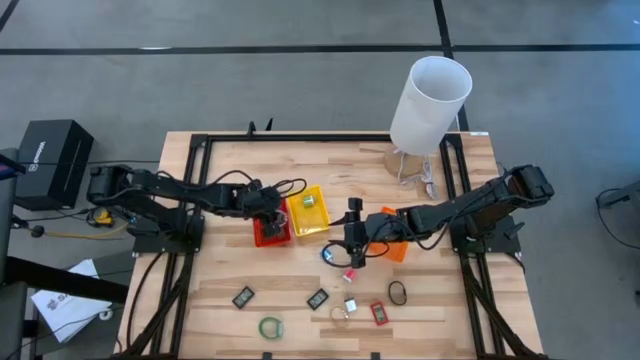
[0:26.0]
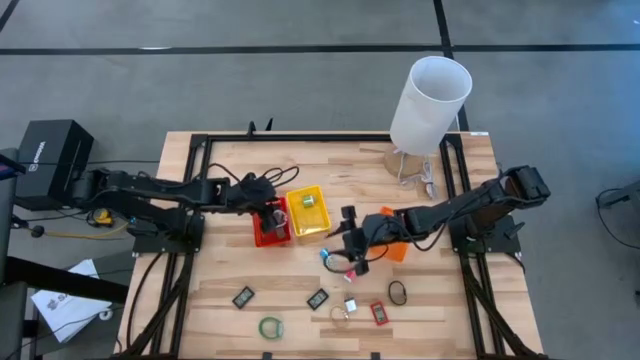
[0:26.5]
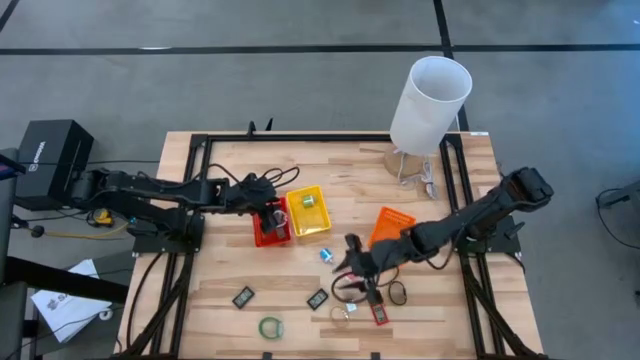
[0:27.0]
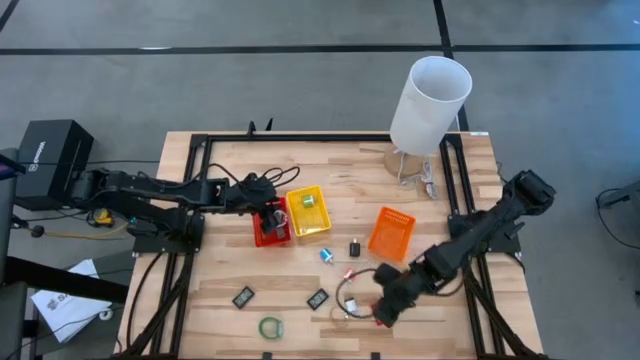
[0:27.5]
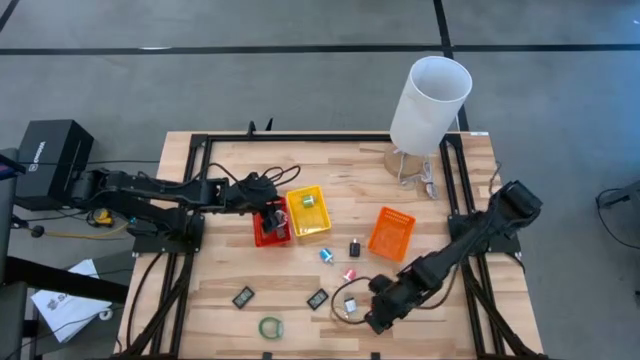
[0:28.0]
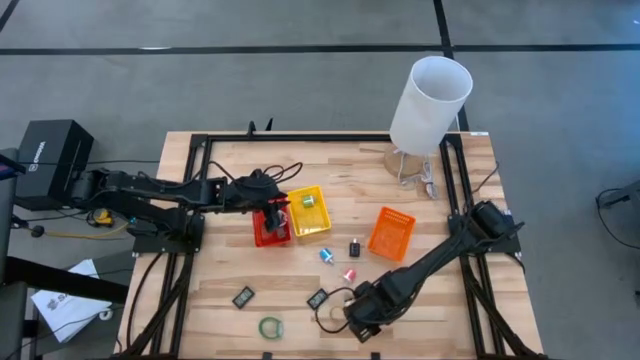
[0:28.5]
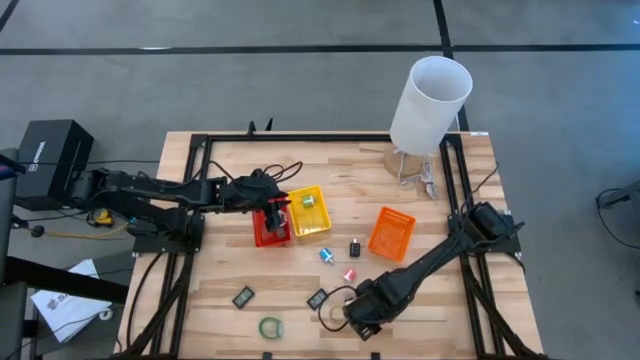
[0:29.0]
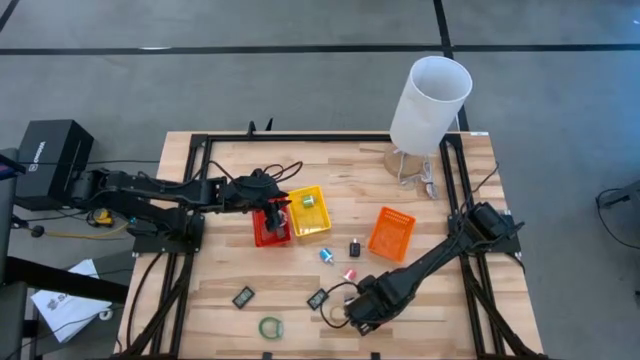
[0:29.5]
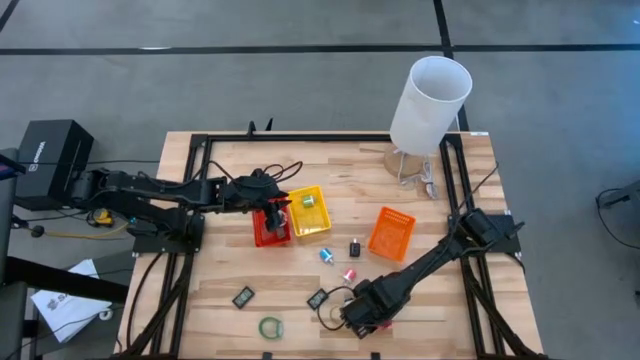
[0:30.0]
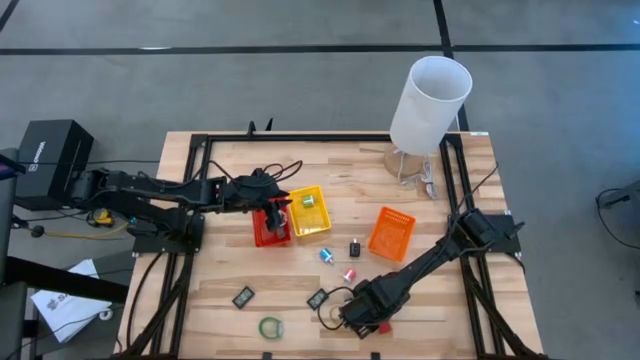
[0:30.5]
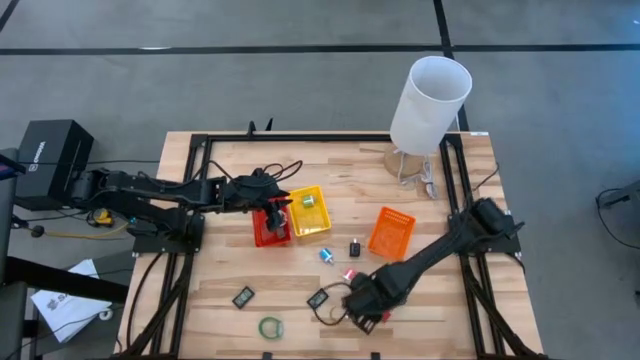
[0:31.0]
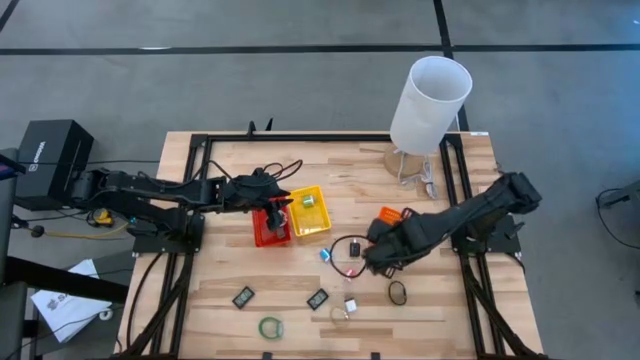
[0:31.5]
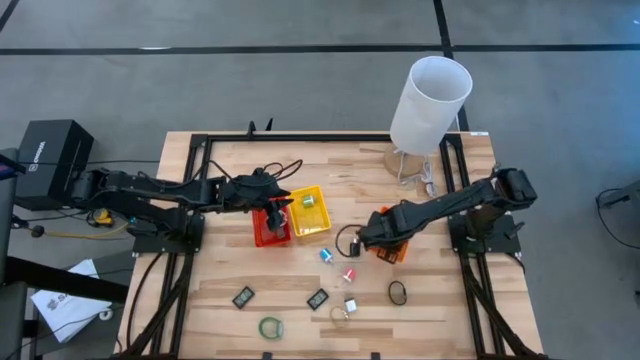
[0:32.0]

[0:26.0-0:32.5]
Task: Pick & Place Office items
Put the red digital clock into the orange bin

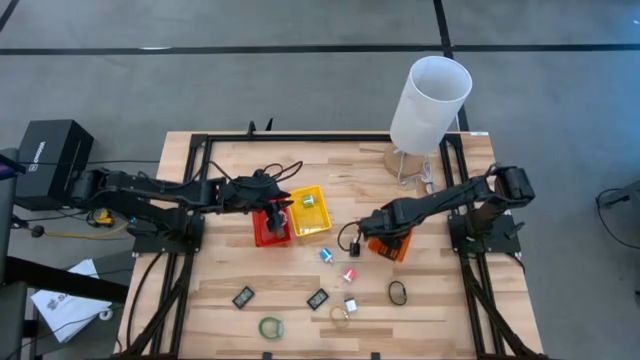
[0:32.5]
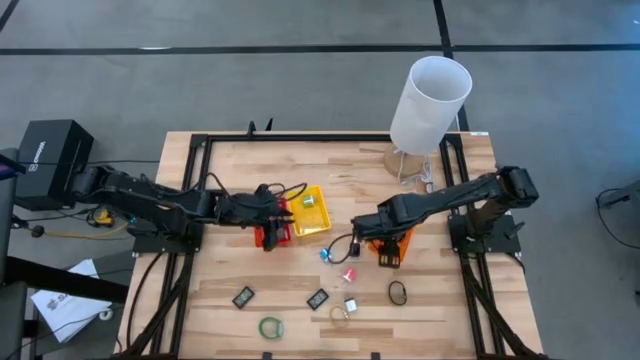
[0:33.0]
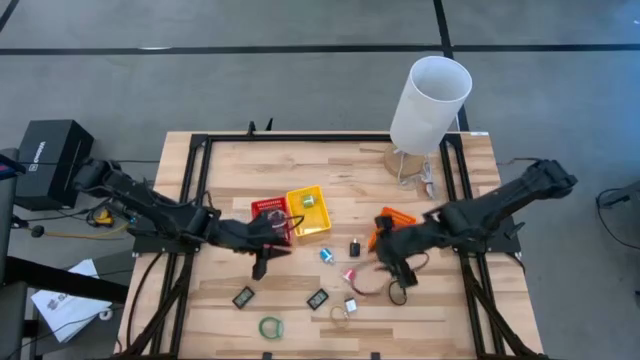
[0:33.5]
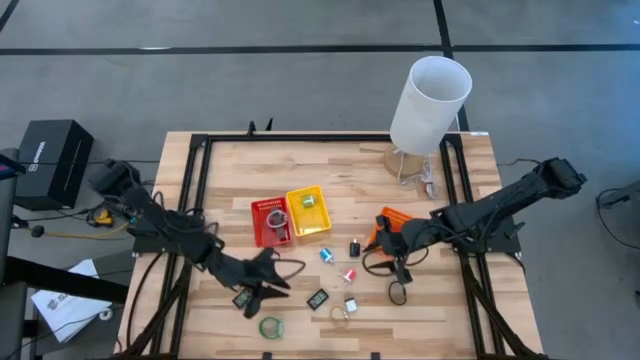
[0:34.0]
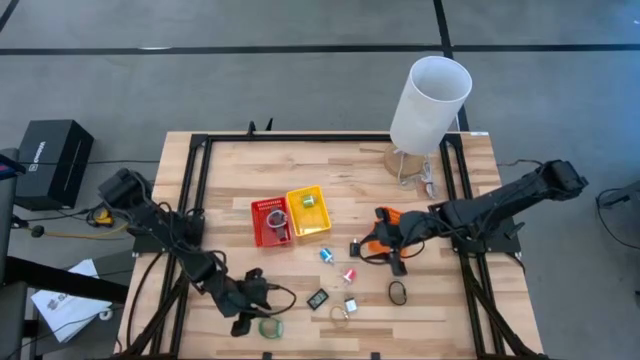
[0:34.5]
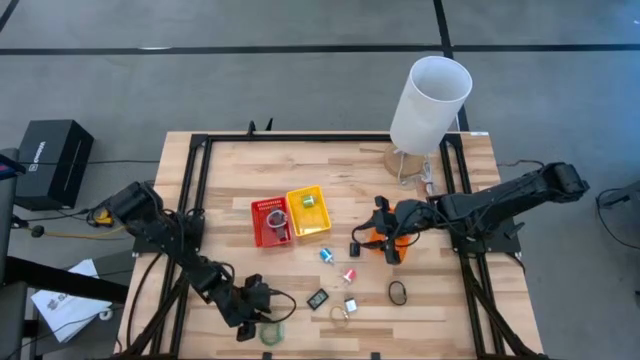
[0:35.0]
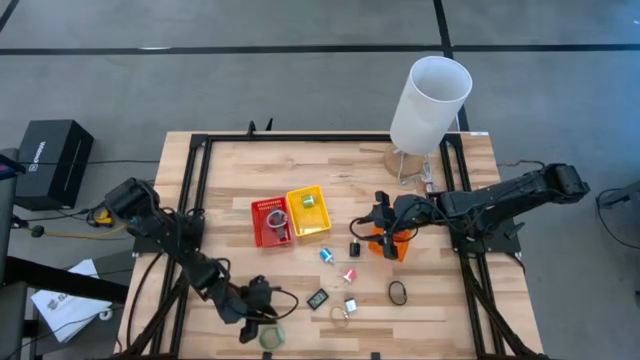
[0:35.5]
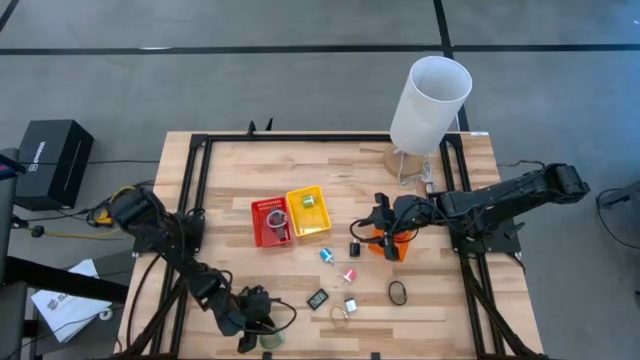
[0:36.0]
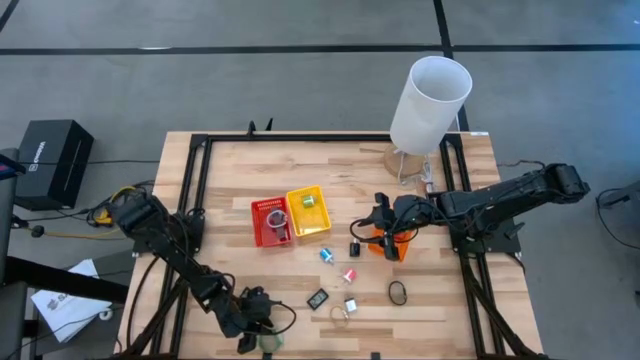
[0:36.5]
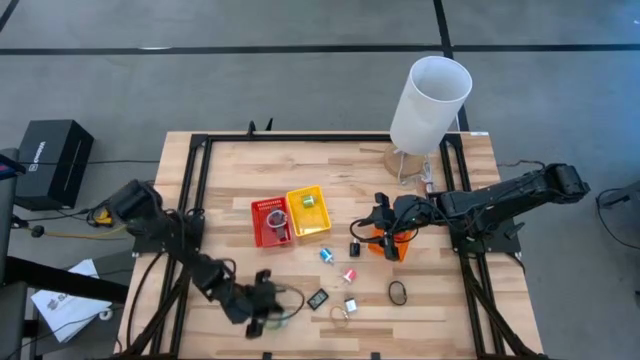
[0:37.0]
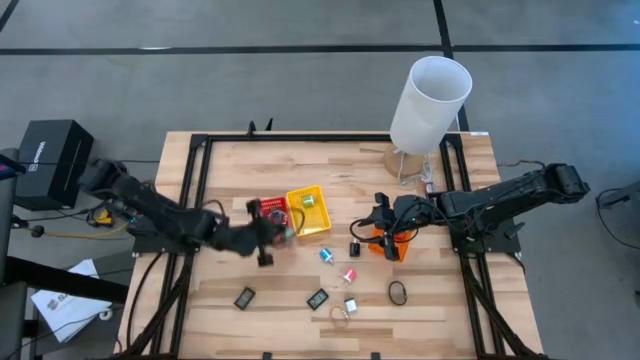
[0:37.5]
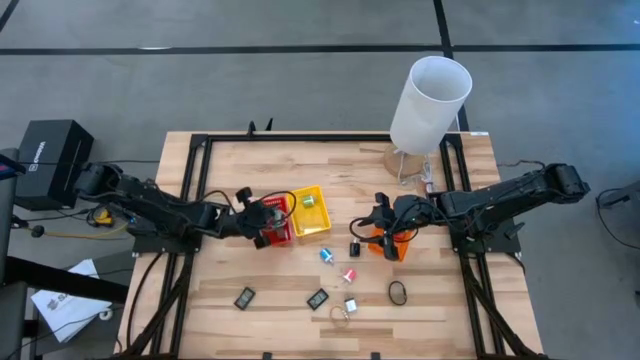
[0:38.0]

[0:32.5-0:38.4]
Put the green wrist watch into the red bin

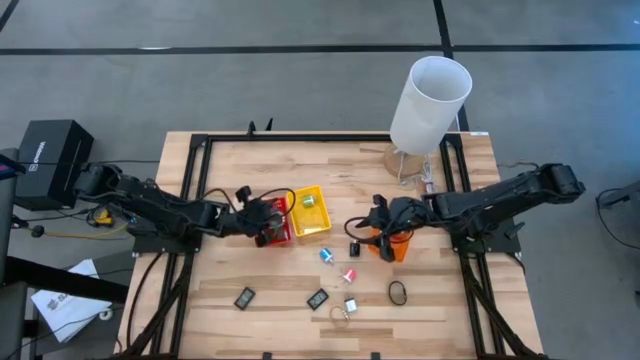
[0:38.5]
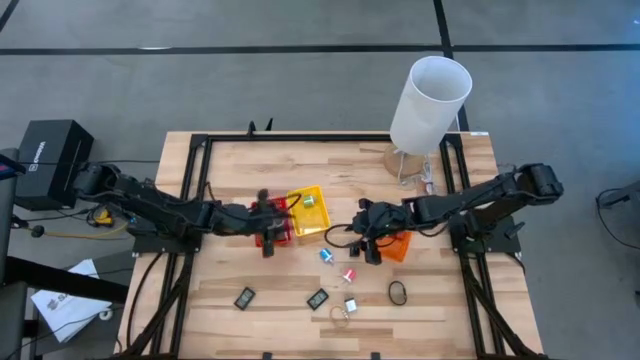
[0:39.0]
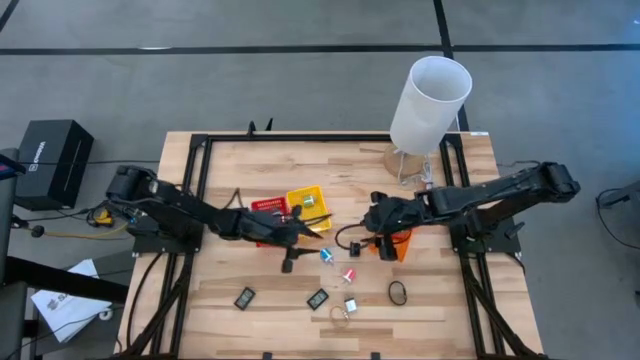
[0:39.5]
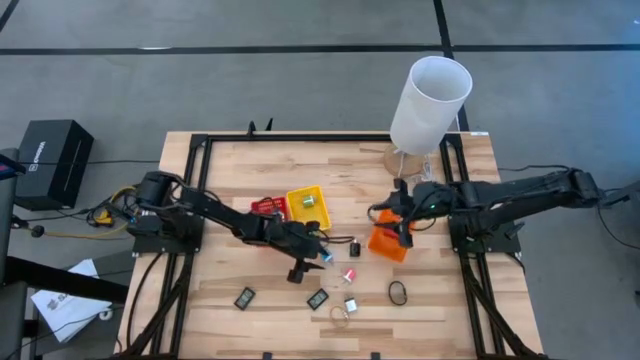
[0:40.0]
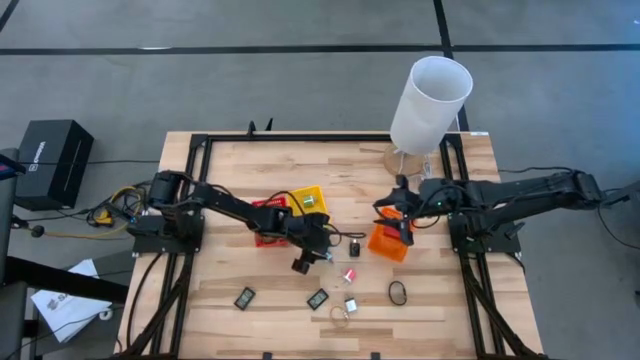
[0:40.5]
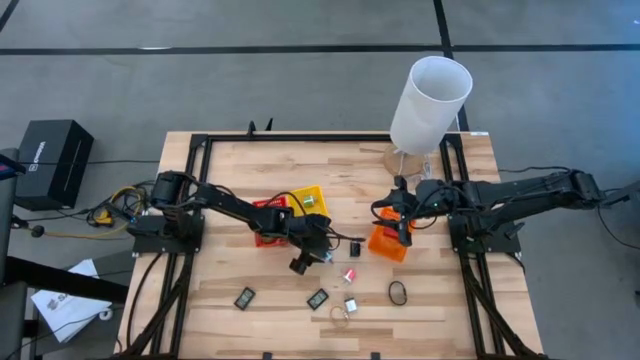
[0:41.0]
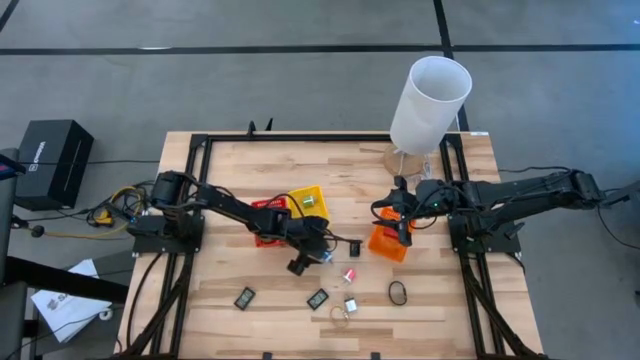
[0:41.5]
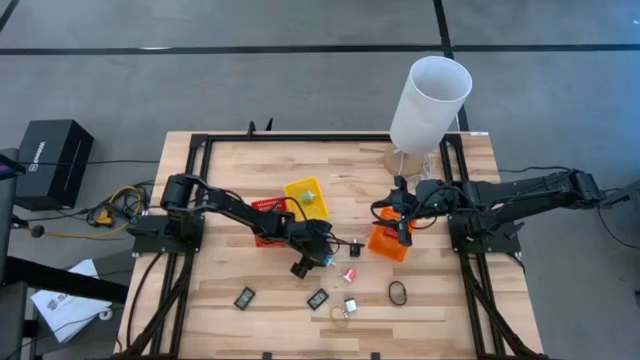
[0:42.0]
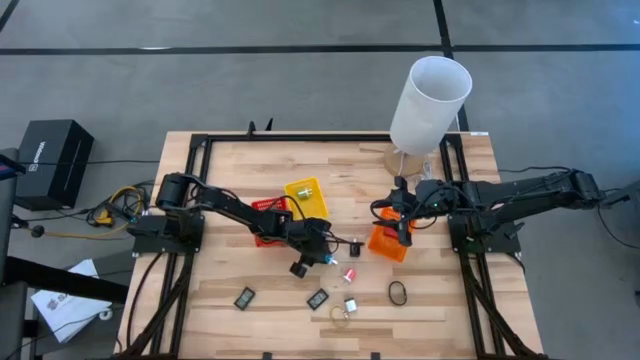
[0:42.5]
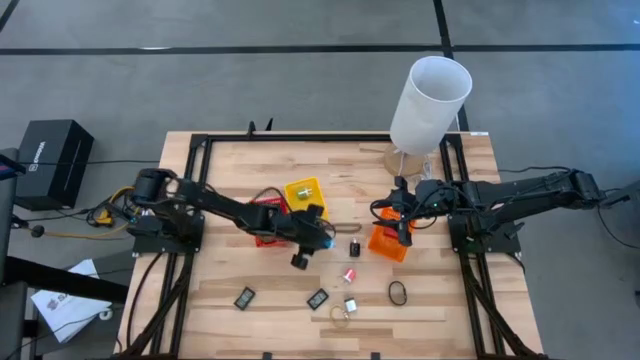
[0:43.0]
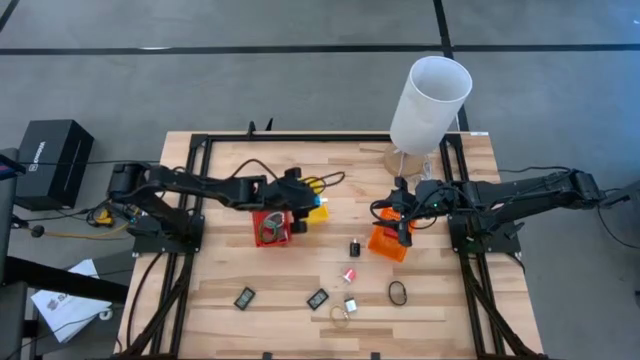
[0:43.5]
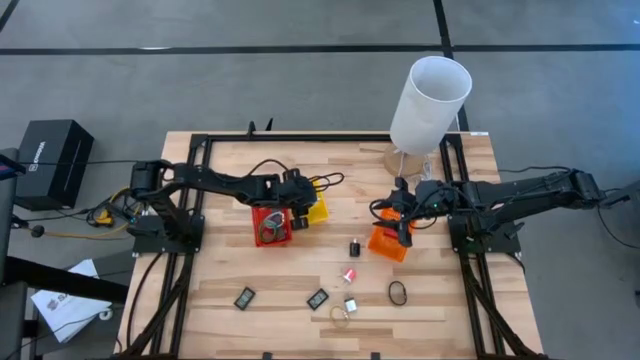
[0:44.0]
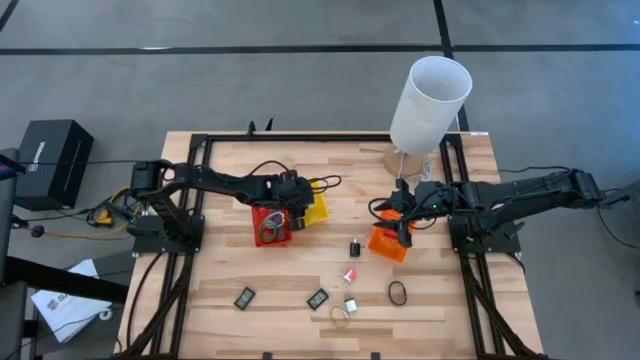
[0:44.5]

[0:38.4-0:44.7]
Put the blue charger adapter into the yellow bin

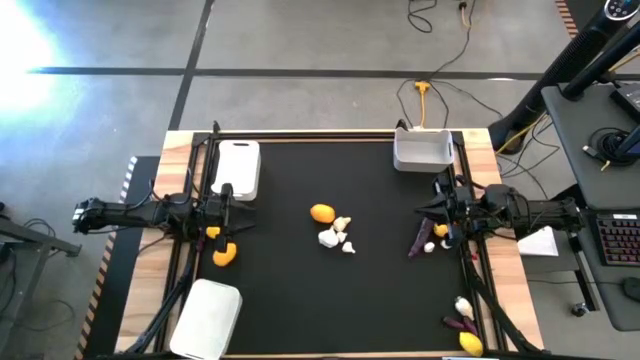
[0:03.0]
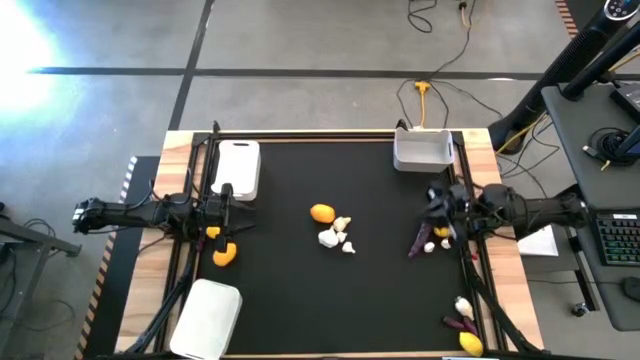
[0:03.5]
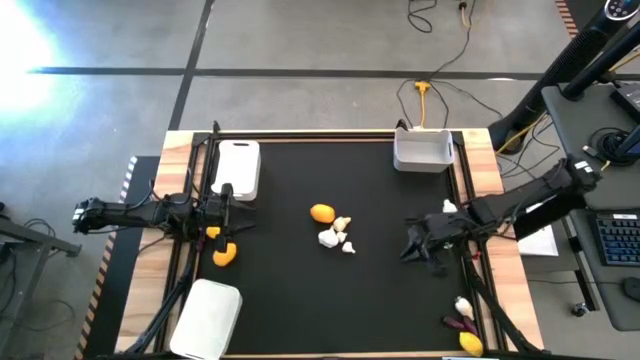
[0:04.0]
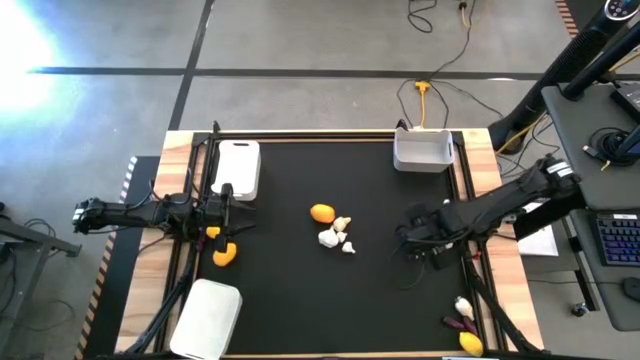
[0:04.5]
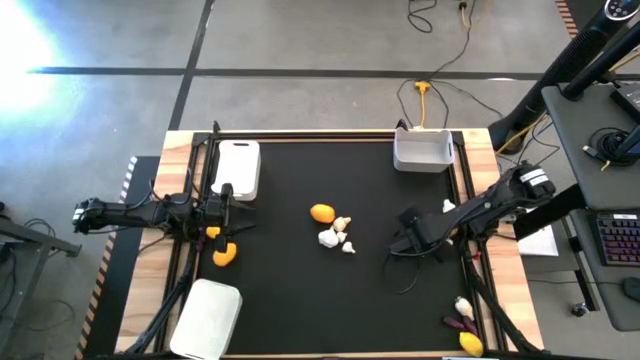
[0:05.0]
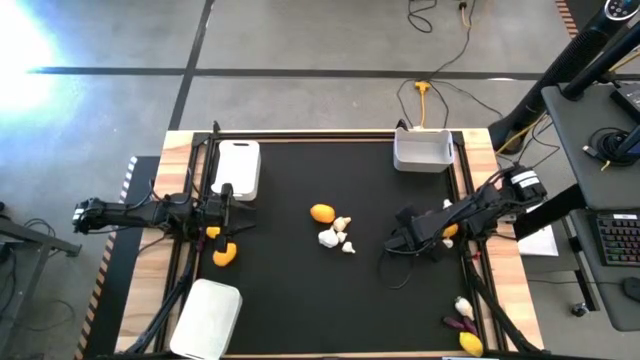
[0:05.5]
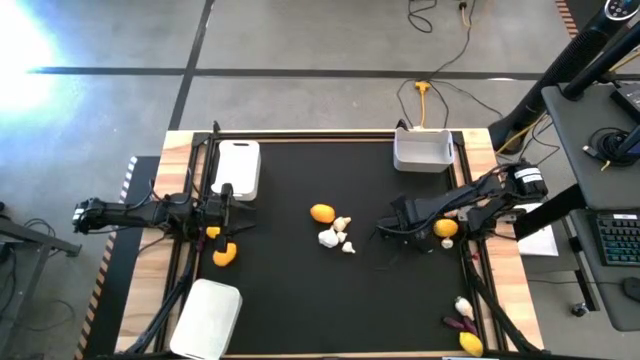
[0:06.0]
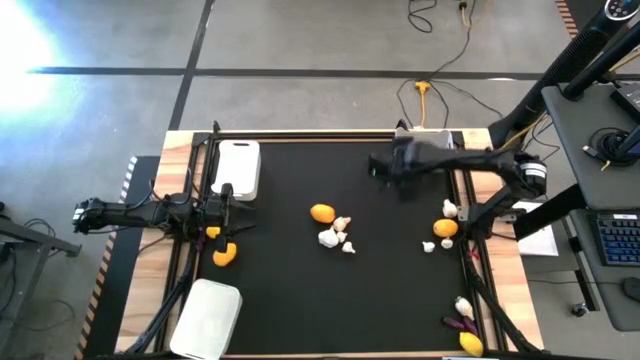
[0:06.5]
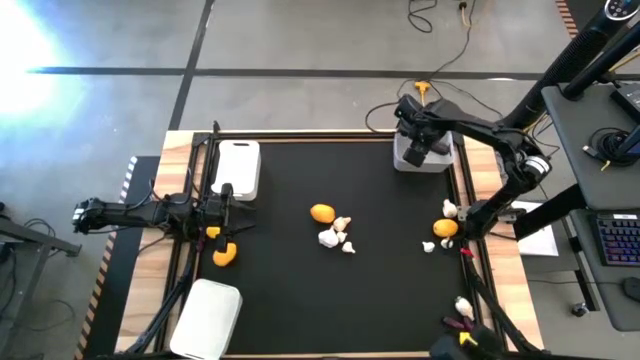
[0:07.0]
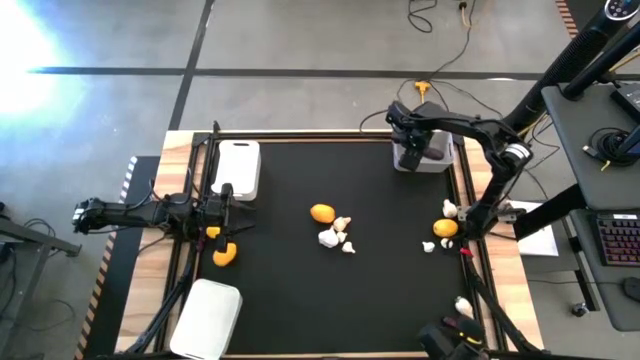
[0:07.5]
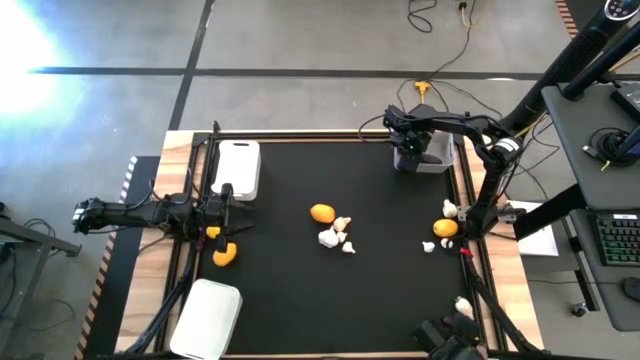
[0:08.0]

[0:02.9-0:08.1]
Task: Sort produce into baskets
Put the big eggplant into the gray bin
